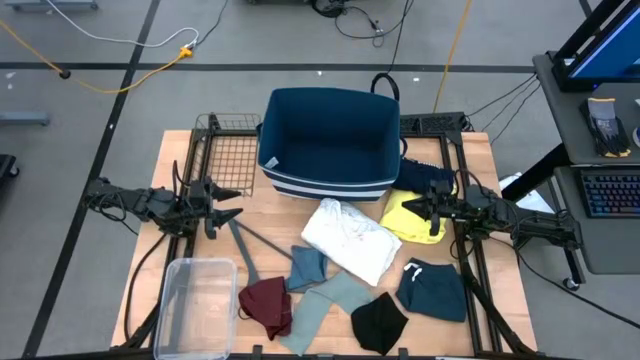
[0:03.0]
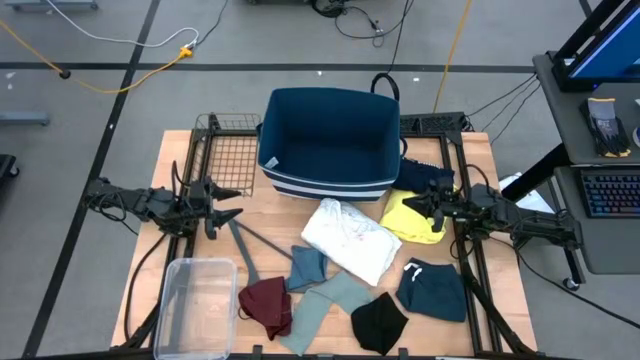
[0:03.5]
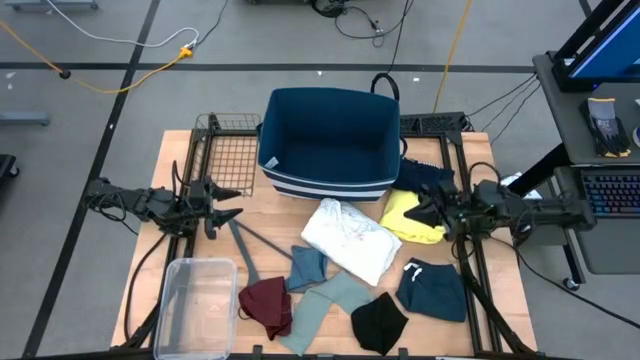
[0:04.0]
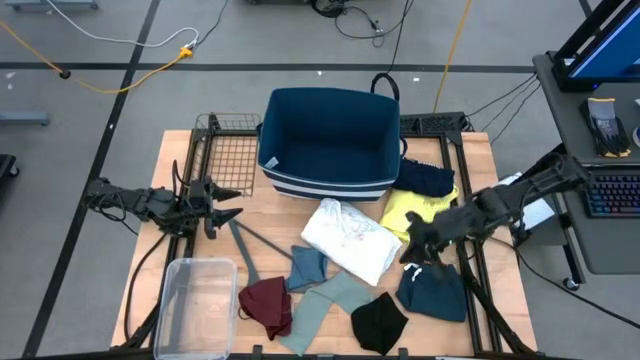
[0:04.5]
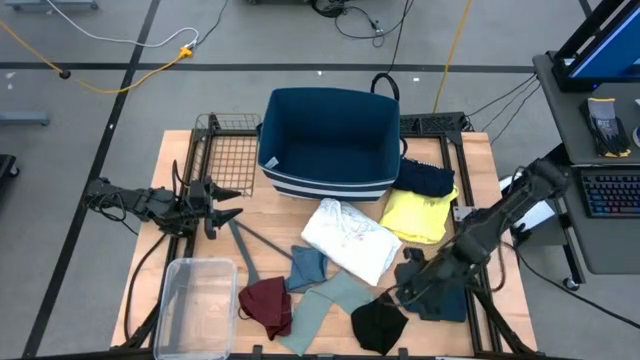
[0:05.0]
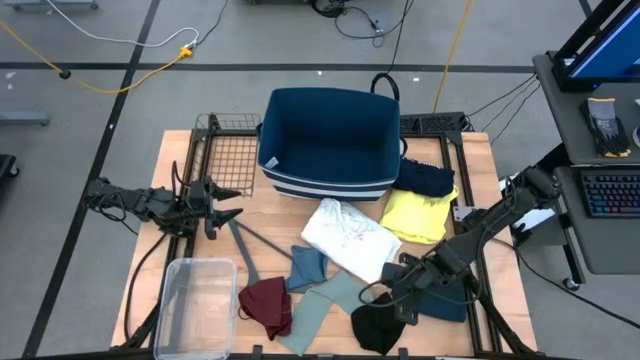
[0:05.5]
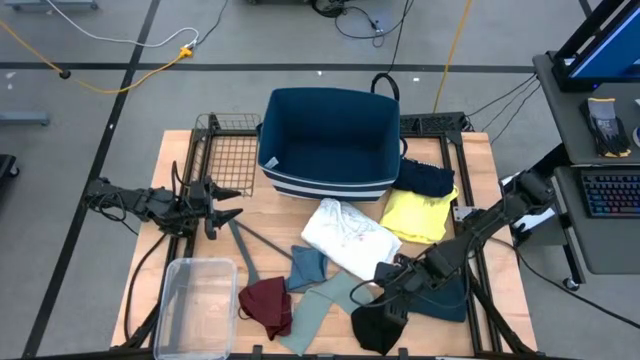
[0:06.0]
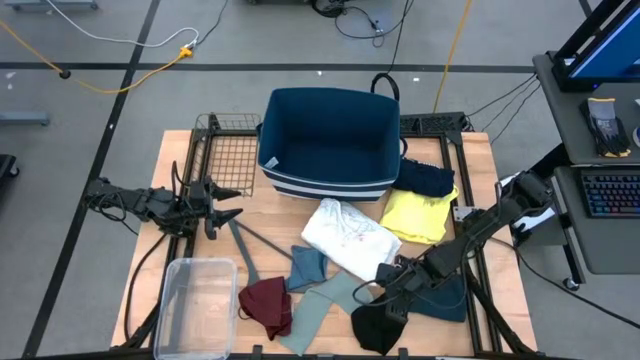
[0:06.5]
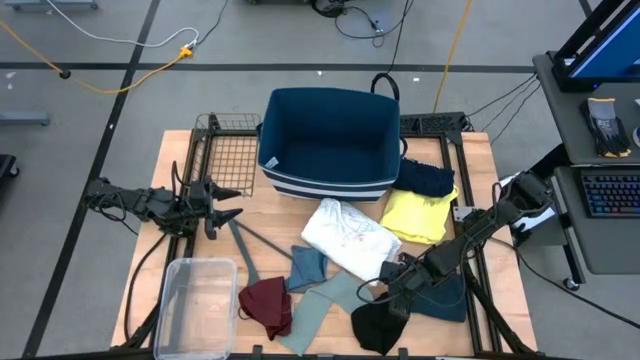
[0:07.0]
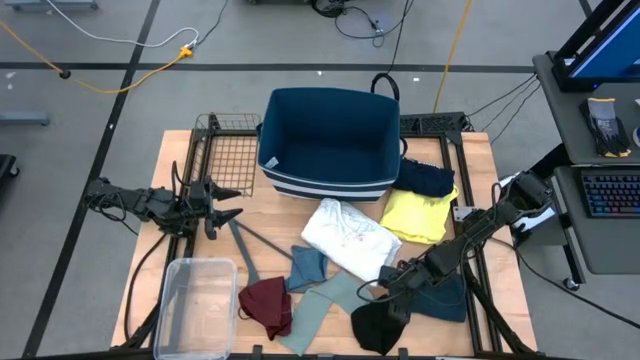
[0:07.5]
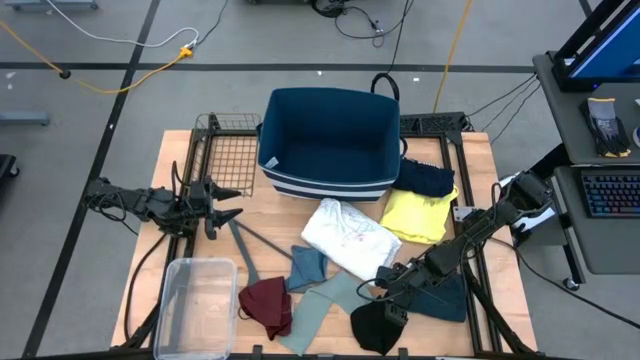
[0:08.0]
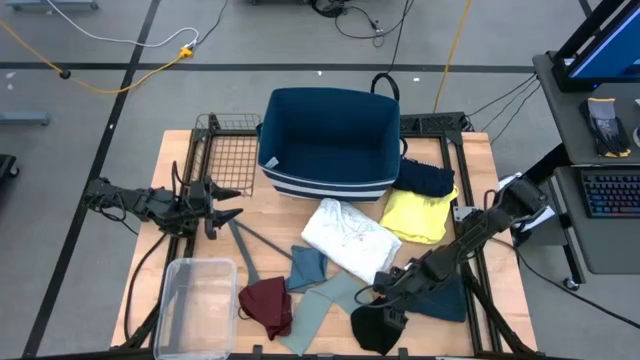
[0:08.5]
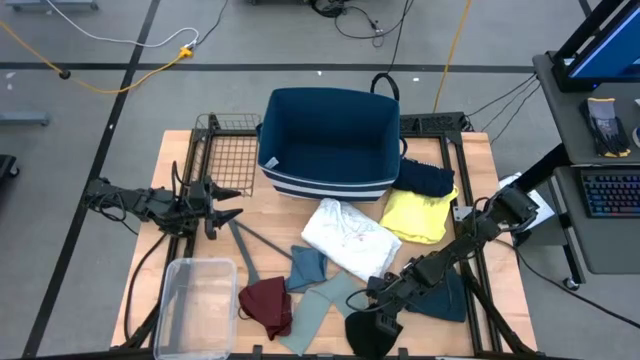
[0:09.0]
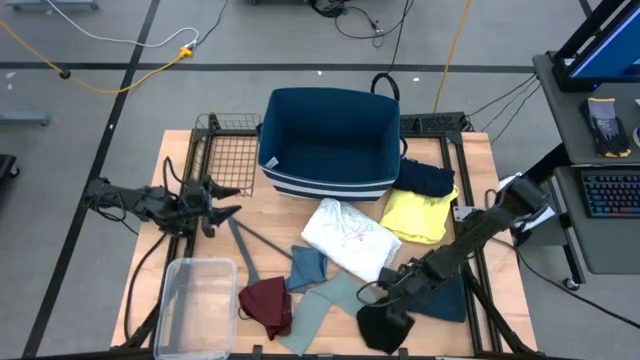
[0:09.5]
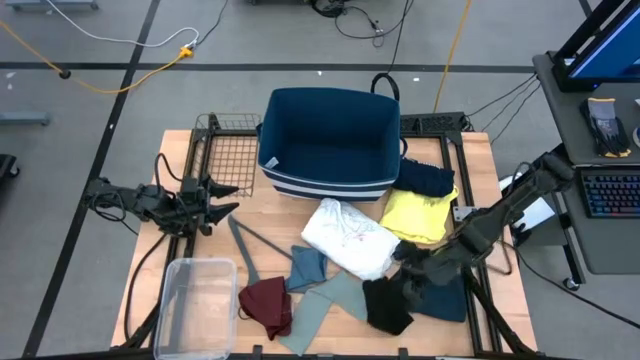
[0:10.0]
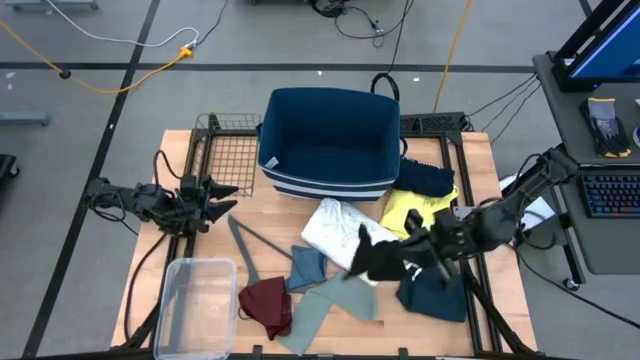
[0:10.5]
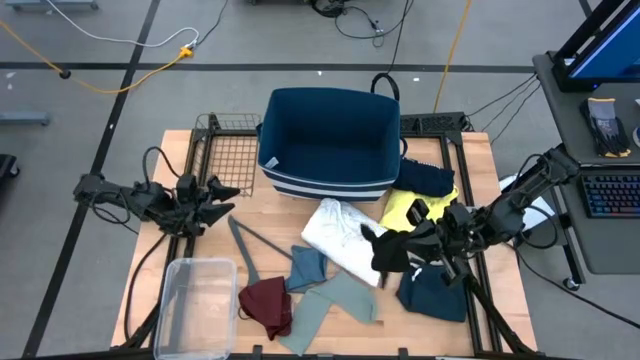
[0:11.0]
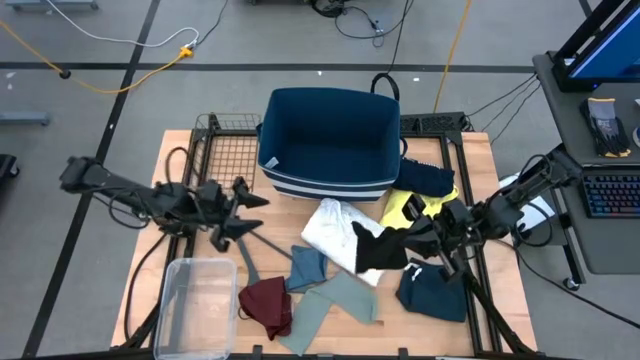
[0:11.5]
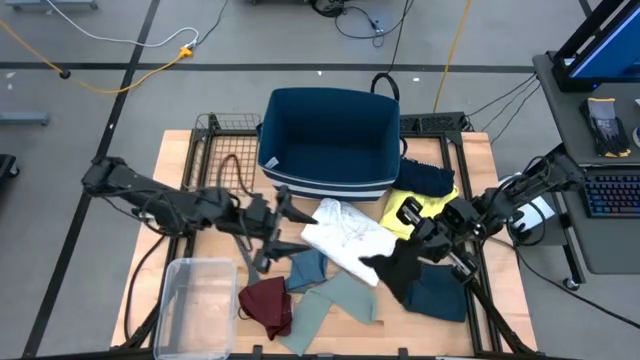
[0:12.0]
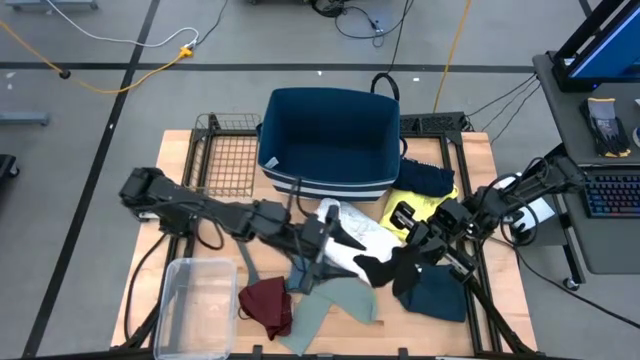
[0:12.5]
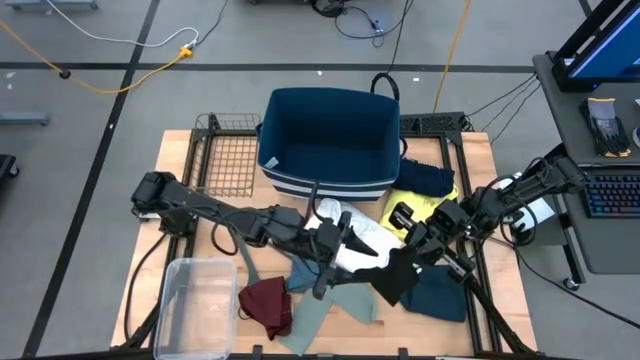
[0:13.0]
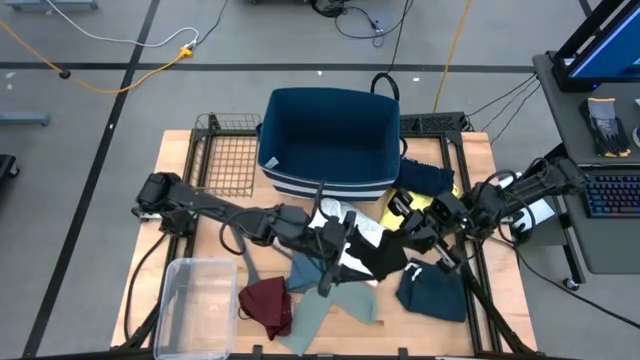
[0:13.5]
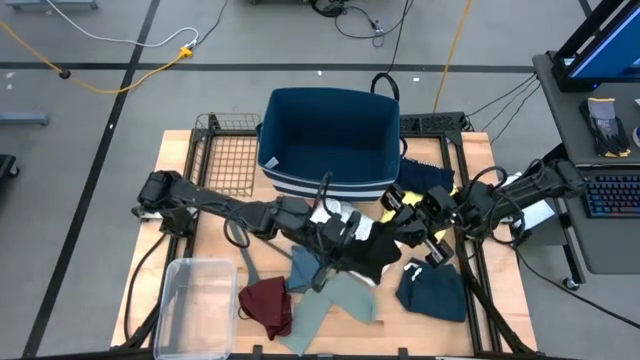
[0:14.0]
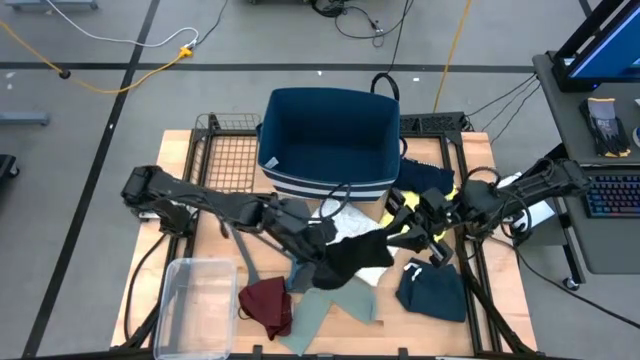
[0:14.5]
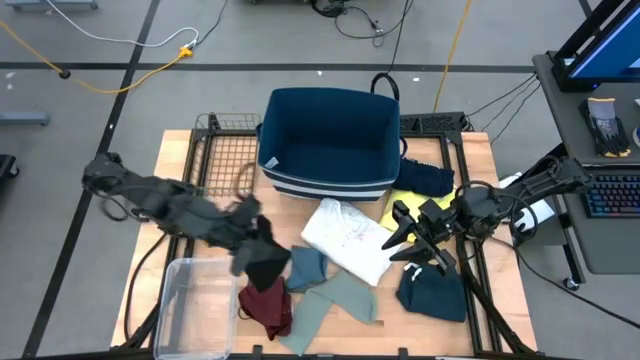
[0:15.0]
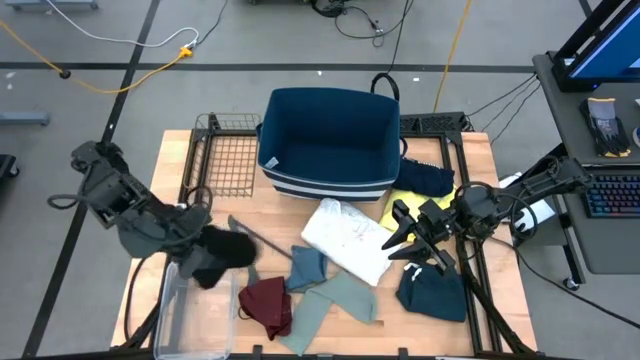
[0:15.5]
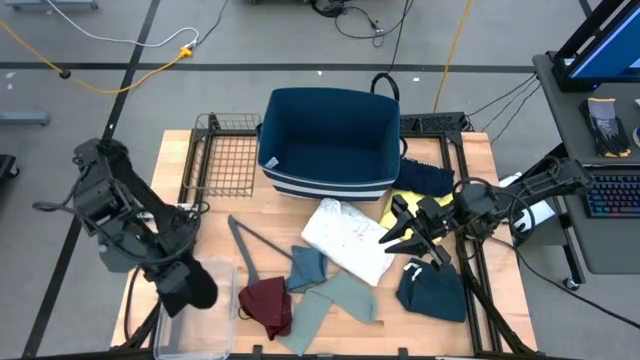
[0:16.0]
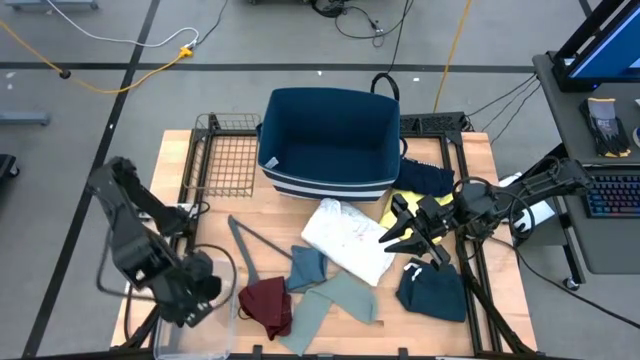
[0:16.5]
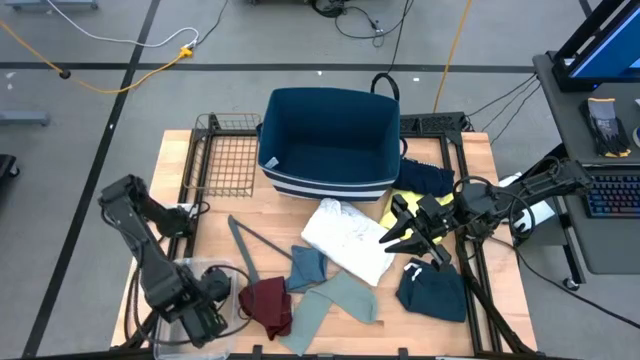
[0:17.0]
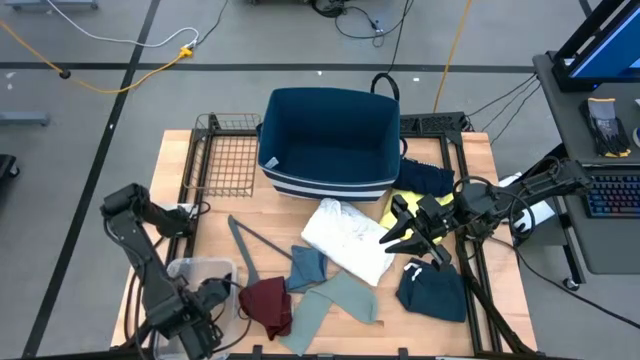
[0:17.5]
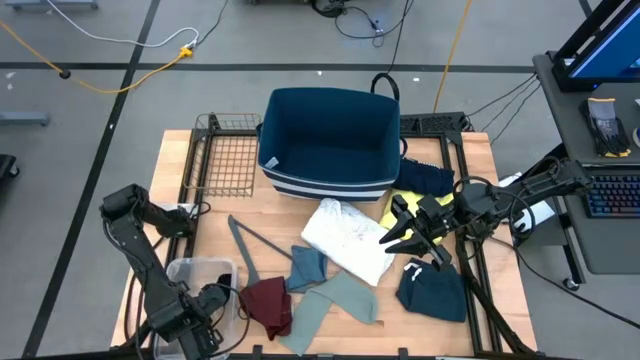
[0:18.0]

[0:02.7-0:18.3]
Task: Pick & Place Cloths
Put the black sock into the transparent bin

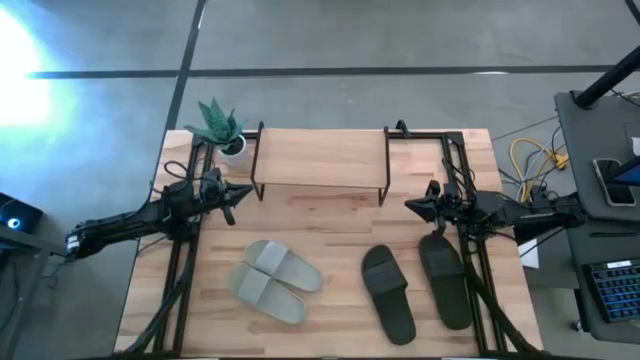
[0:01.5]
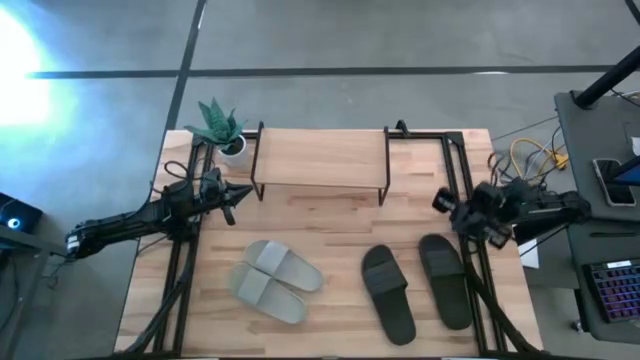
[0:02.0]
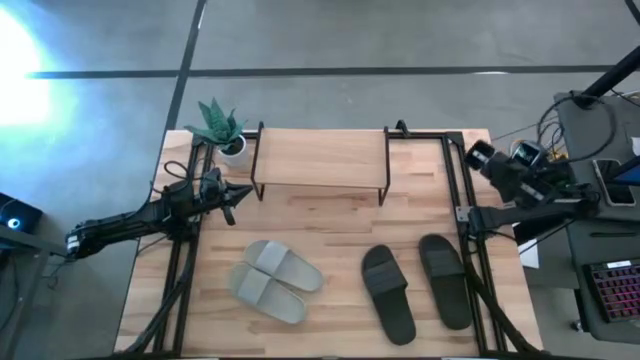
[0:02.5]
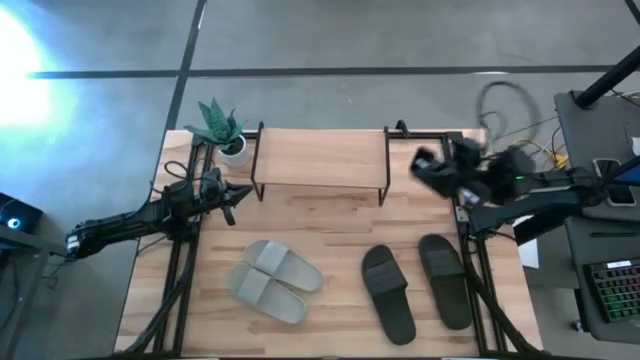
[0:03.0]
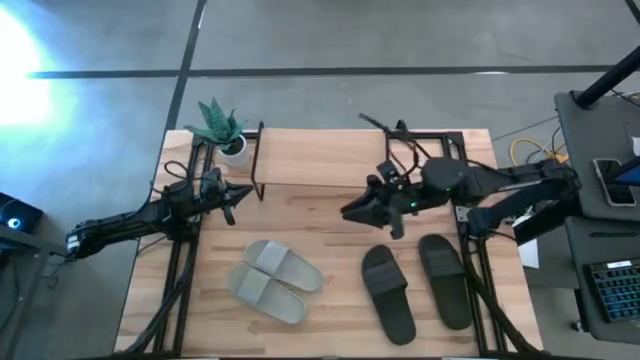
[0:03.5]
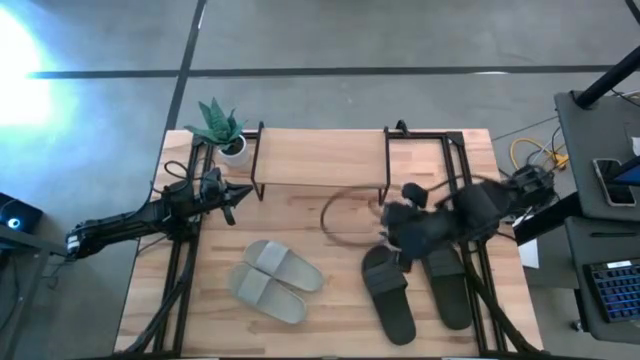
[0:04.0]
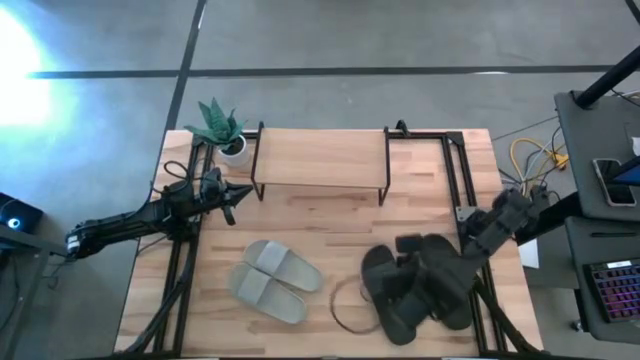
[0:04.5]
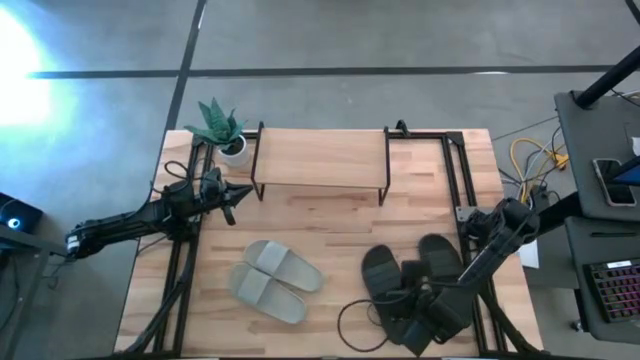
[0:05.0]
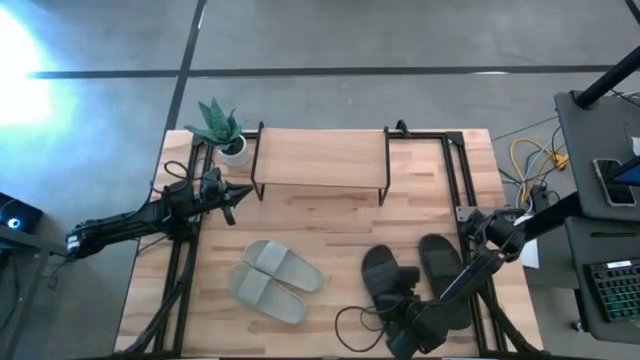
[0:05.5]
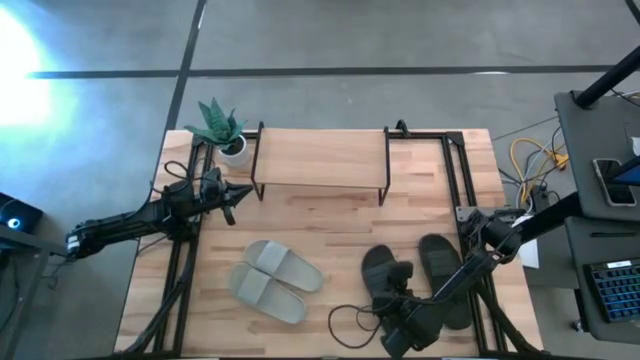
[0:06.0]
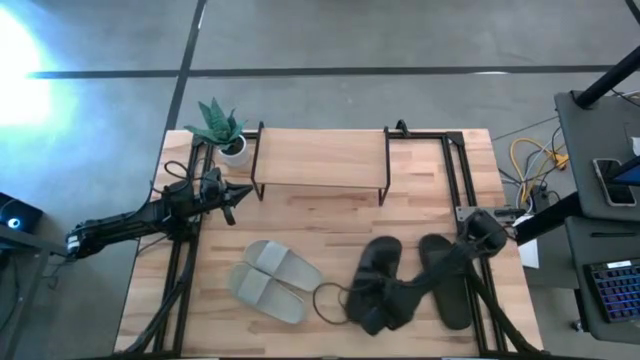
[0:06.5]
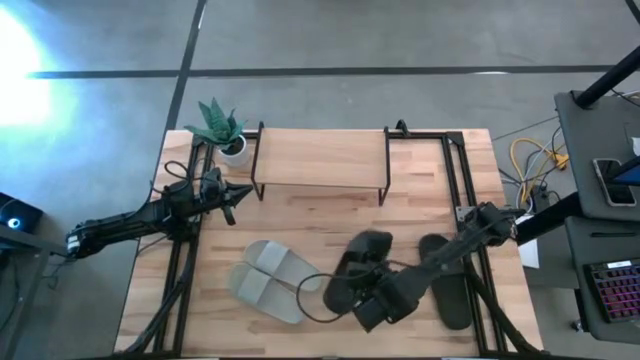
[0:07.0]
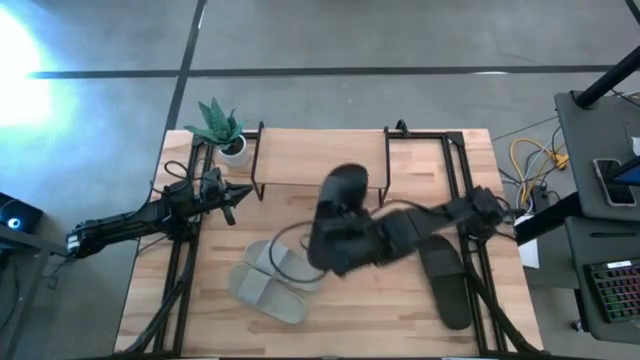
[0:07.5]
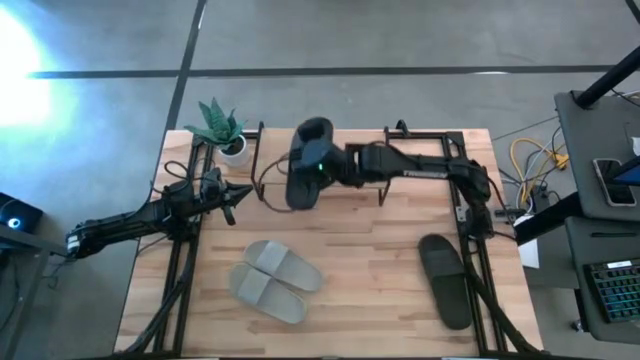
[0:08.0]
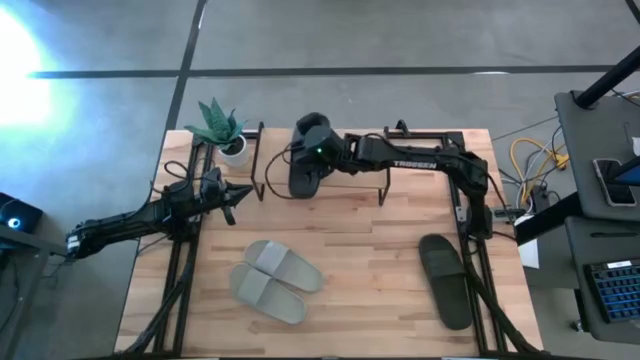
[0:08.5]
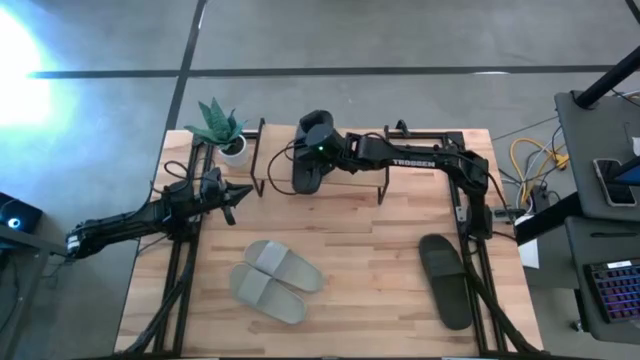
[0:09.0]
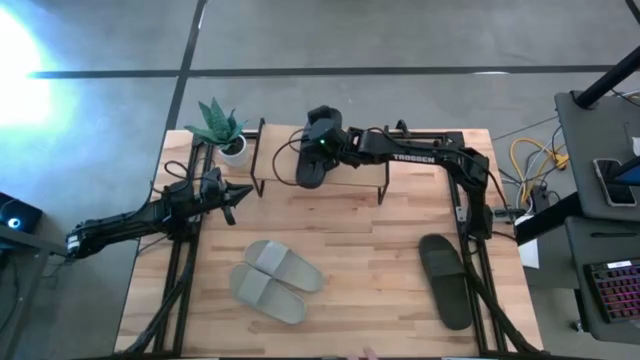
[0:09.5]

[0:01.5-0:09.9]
Task: Pick and place slides into the shelf
Put the left black slipper on the shelf
